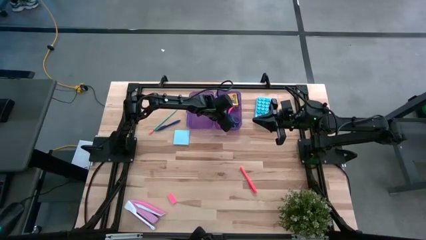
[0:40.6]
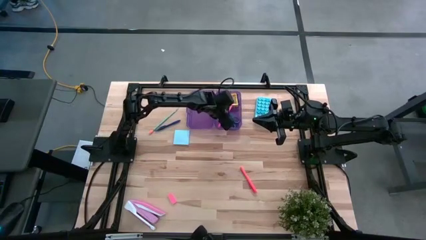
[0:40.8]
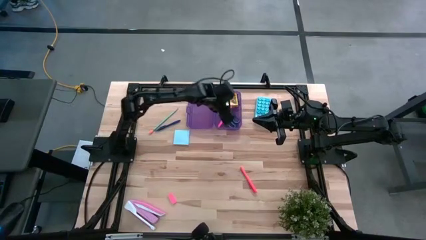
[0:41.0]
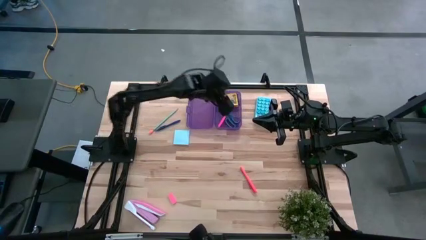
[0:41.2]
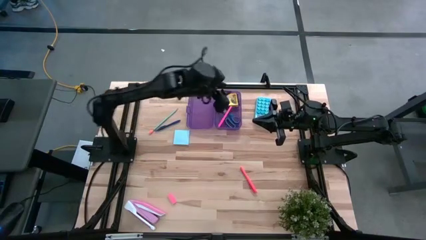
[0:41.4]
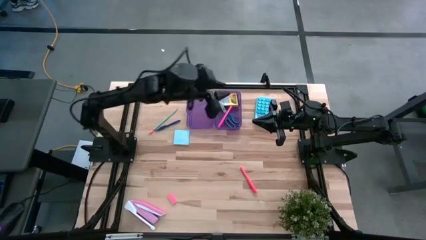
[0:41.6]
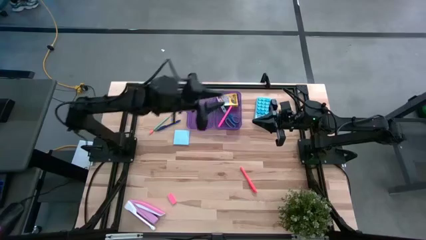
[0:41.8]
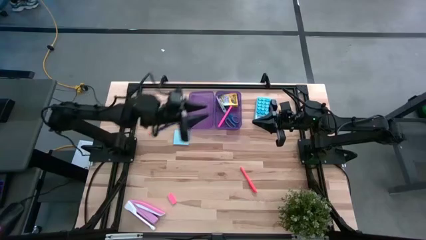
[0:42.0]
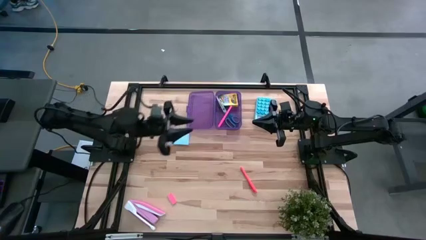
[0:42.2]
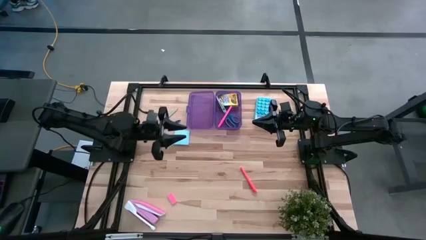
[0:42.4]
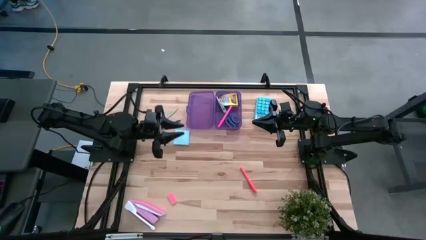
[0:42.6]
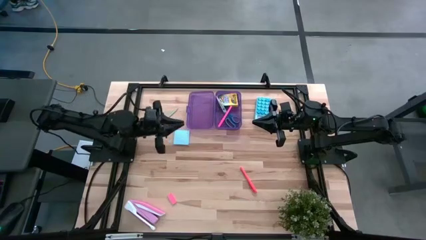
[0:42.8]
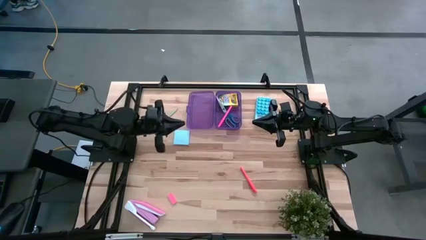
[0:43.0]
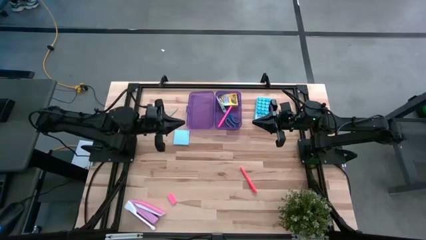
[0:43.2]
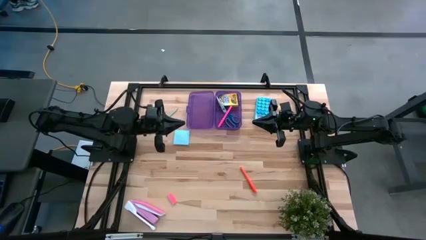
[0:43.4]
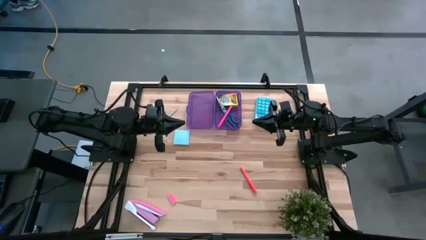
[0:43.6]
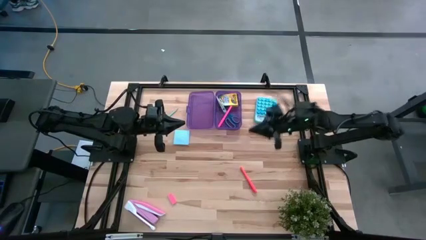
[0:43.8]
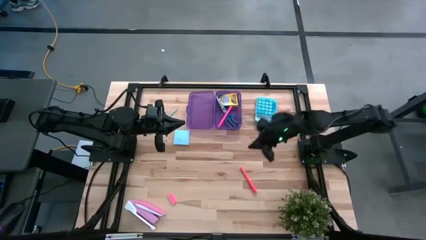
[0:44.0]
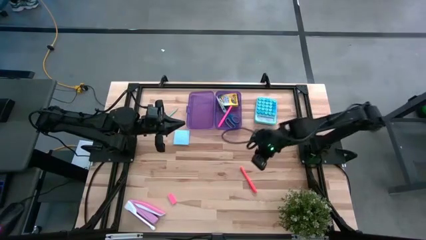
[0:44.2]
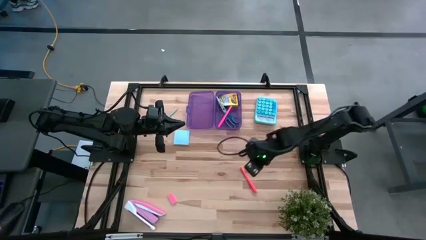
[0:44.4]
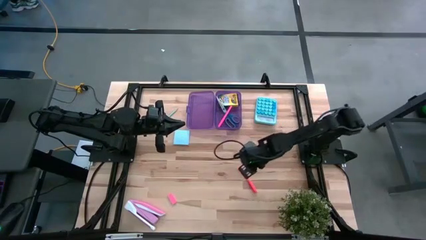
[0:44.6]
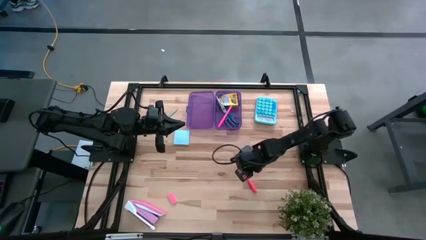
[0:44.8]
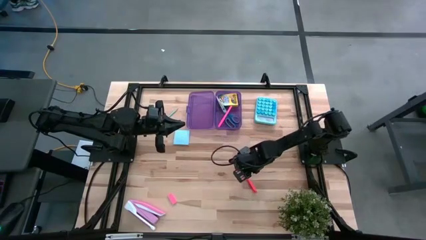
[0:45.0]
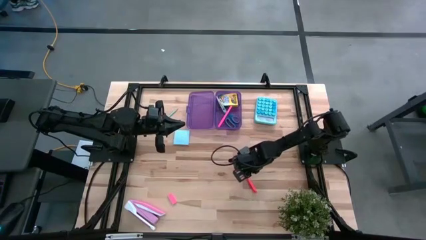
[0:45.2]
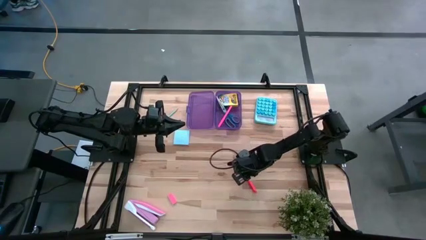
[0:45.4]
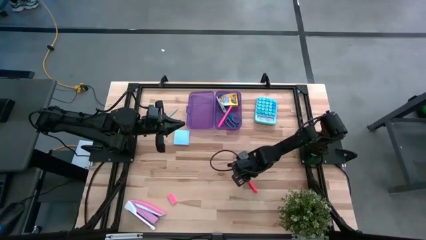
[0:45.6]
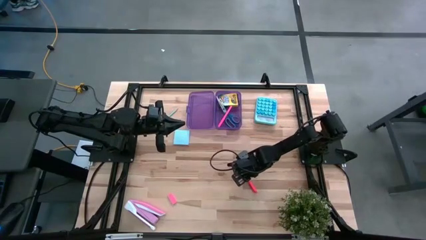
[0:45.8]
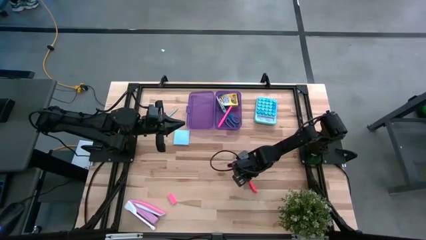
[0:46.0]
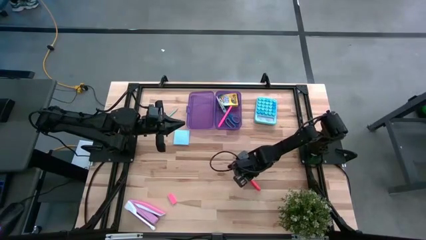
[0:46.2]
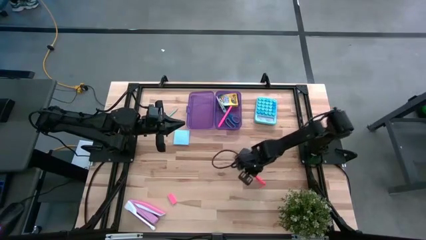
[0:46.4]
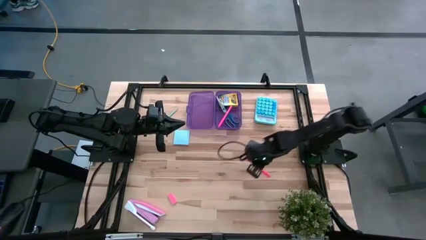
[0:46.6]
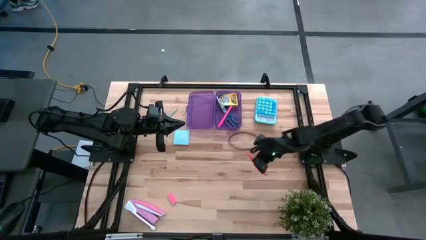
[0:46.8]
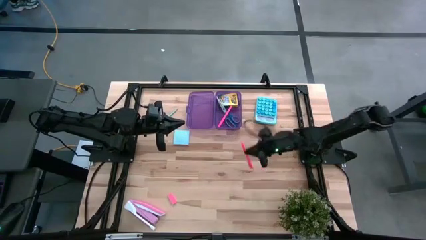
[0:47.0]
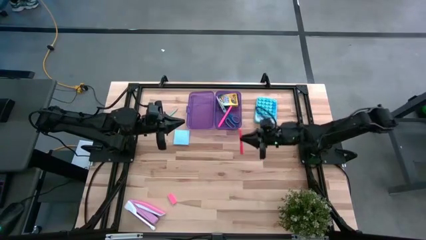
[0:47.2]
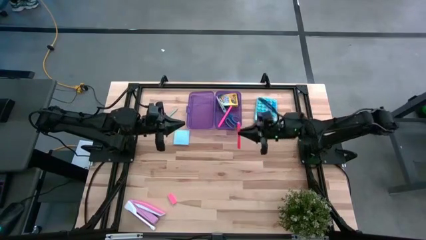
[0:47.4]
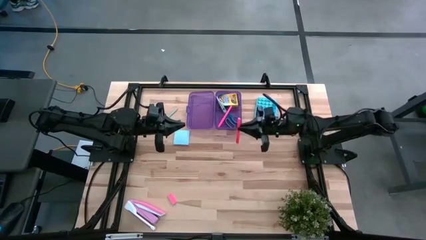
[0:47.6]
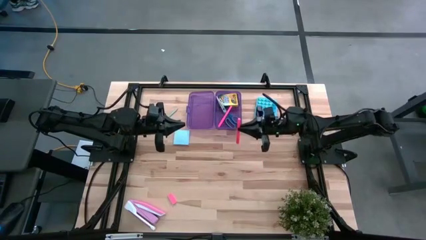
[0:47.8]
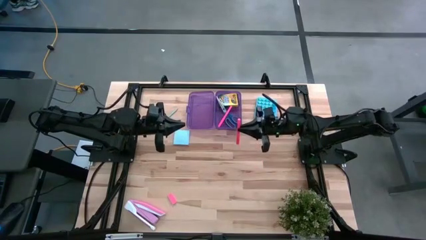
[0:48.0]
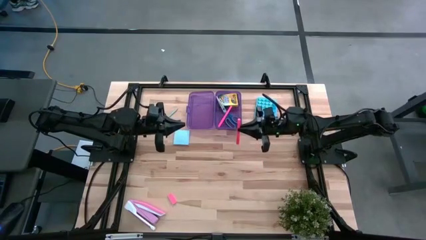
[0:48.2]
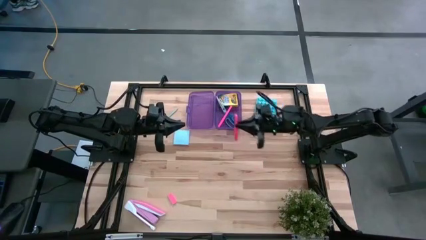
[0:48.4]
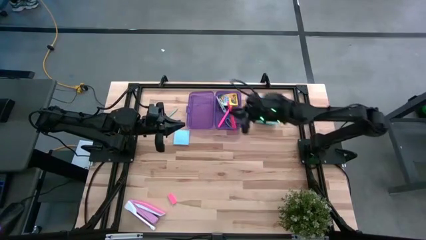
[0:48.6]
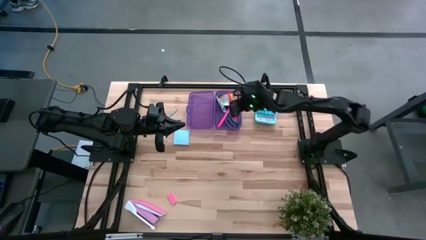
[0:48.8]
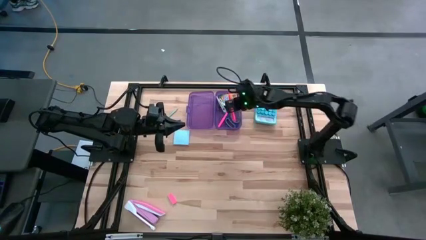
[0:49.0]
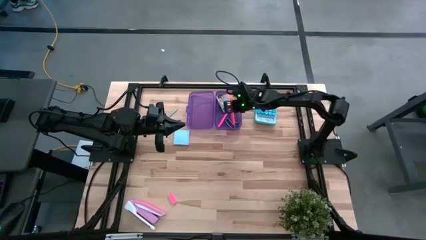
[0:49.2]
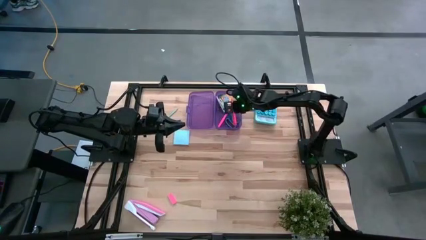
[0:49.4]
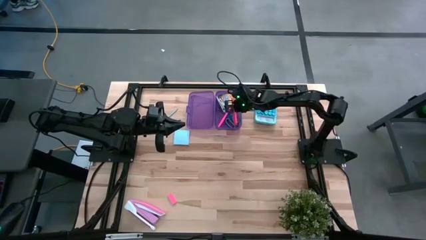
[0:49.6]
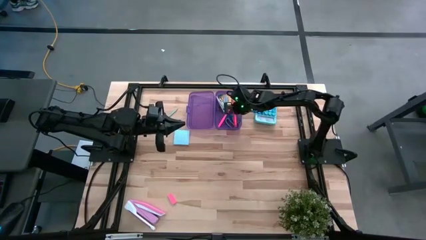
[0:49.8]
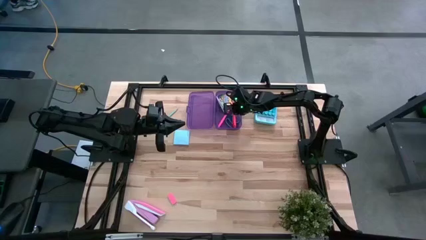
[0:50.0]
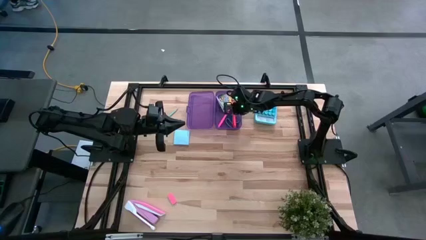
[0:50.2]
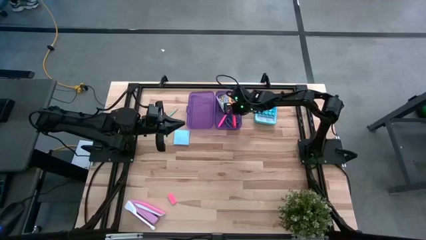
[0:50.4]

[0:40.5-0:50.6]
Task: Pack school essentials
Put the orange pen into the purple supply box

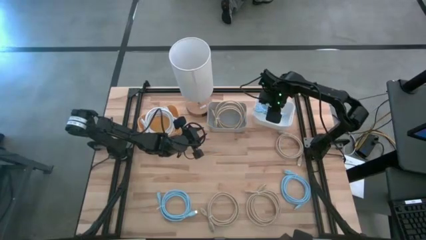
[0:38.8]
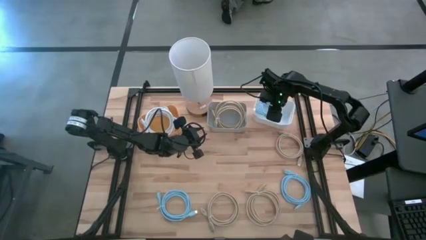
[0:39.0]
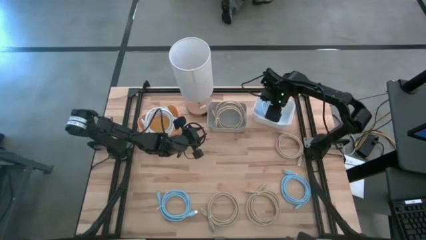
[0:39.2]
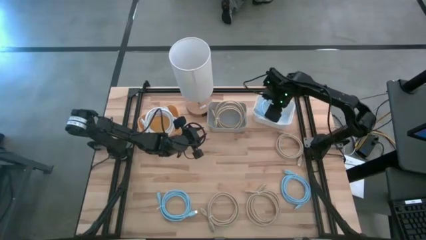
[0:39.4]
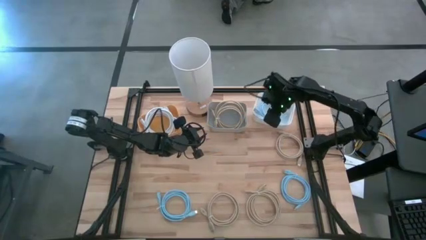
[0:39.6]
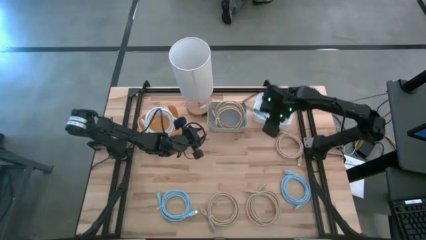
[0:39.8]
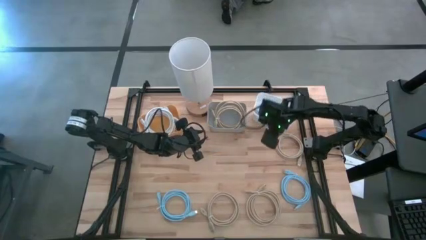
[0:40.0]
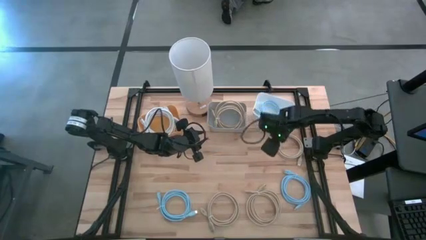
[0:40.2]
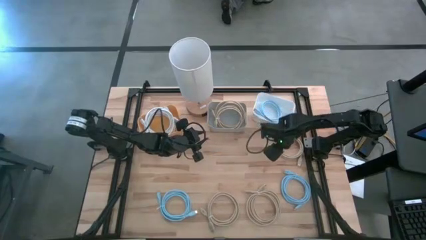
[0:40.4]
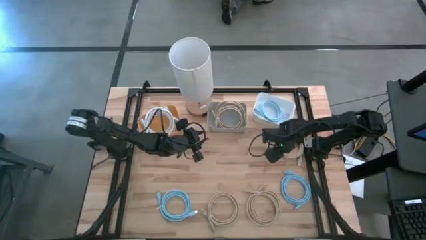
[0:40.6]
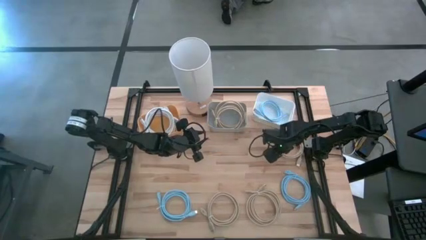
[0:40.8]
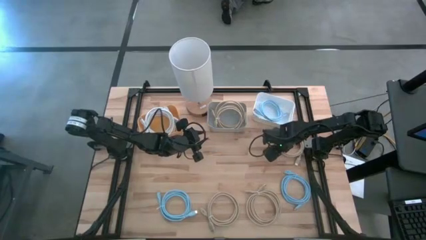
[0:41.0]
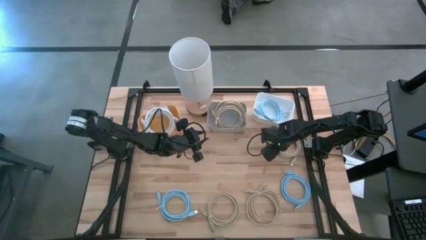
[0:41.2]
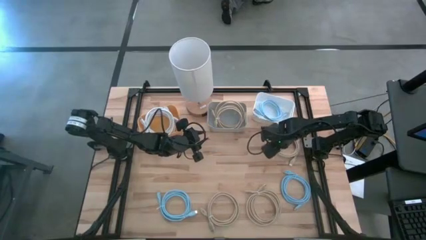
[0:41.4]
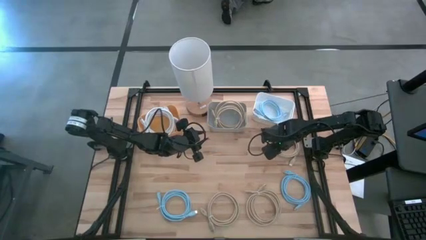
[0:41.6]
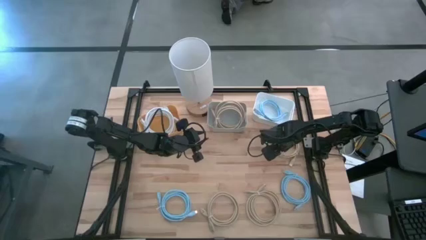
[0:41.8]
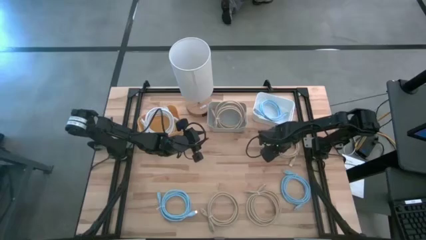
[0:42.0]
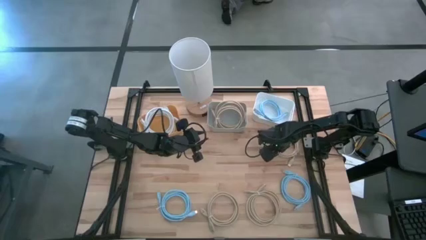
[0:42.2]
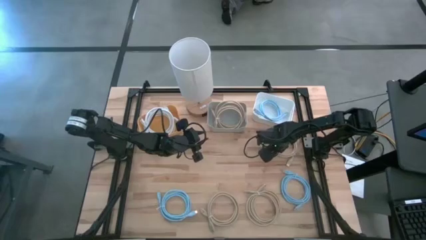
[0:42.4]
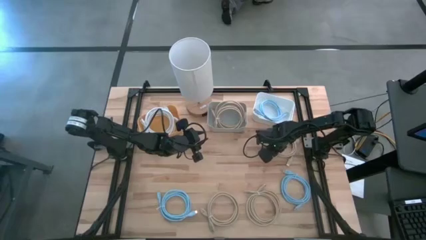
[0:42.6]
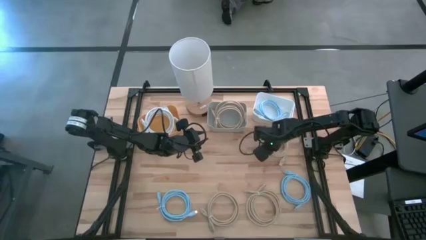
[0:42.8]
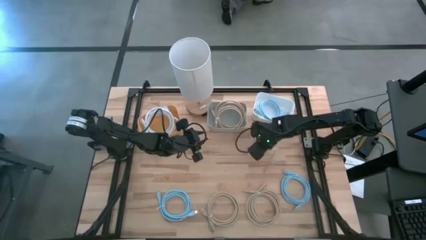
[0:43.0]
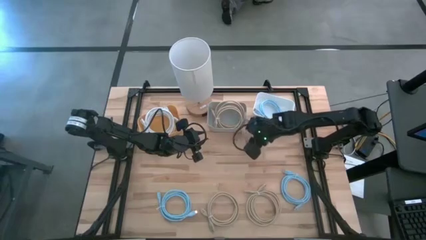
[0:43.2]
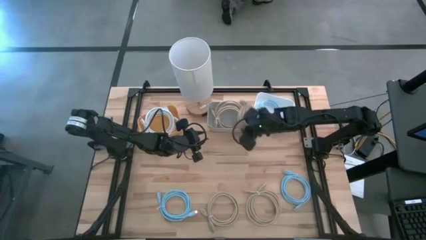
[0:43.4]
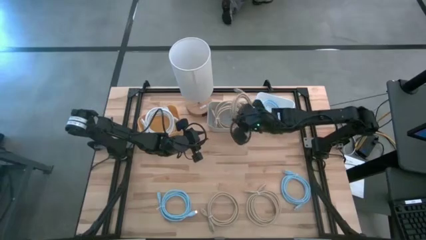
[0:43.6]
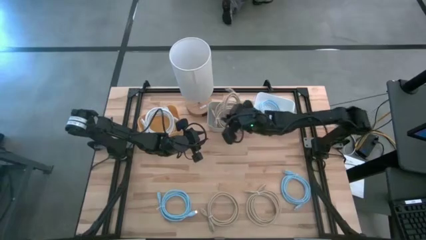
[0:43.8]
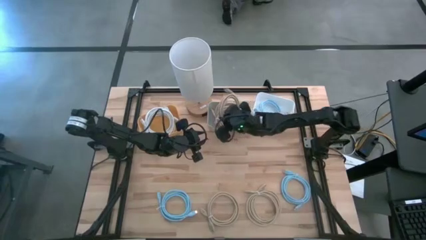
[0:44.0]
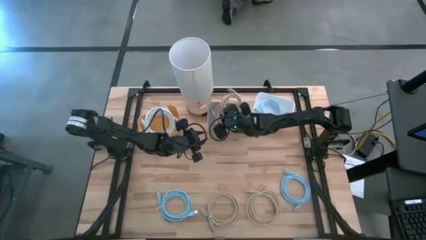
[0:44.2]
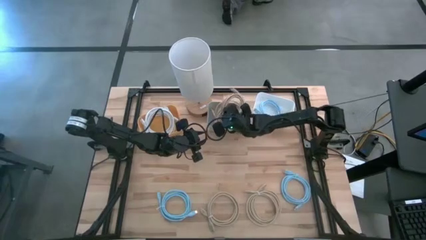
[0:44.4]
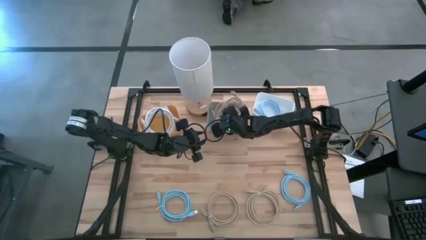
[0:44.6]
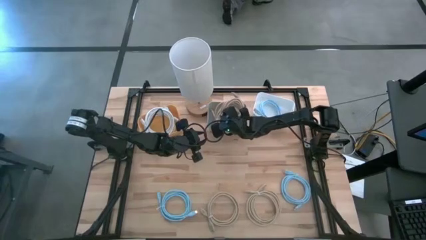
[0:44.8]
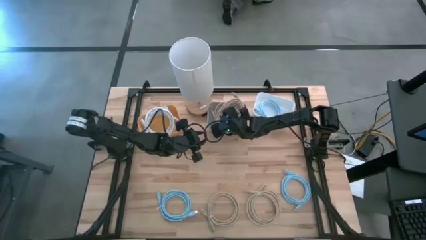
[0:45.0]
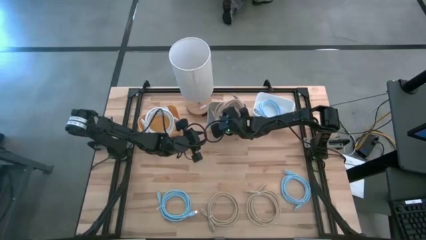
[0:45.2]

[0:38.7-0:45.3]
Task: Sort HDMI cables
Put the brown HDMI cable into the gray bin
